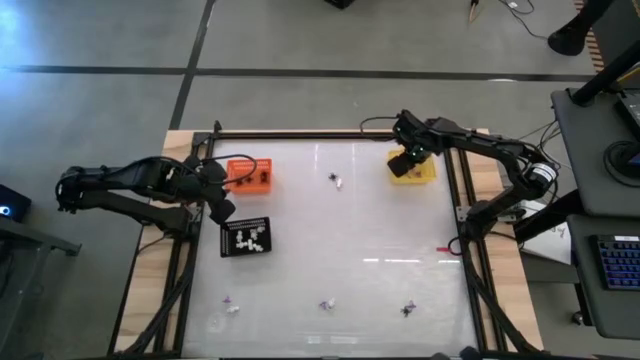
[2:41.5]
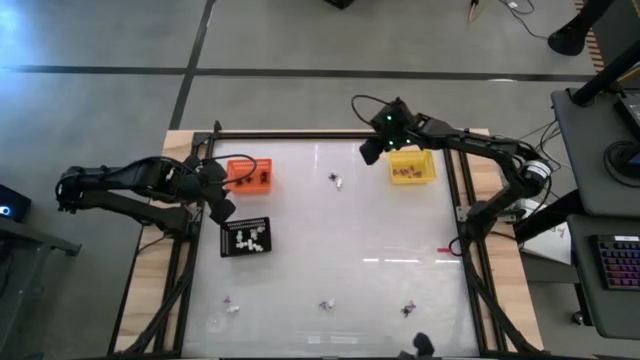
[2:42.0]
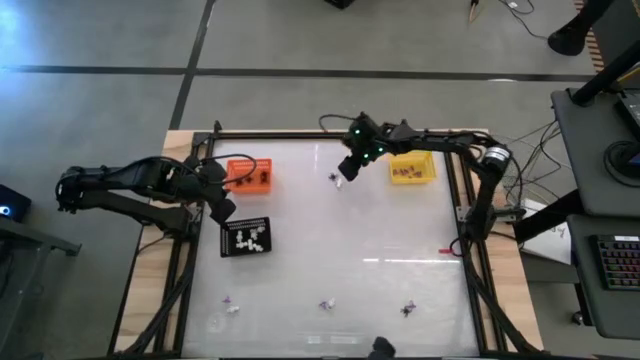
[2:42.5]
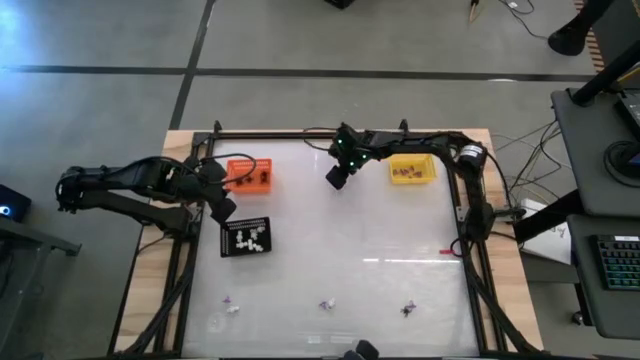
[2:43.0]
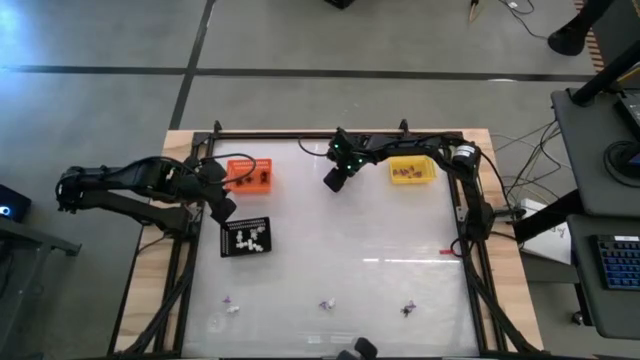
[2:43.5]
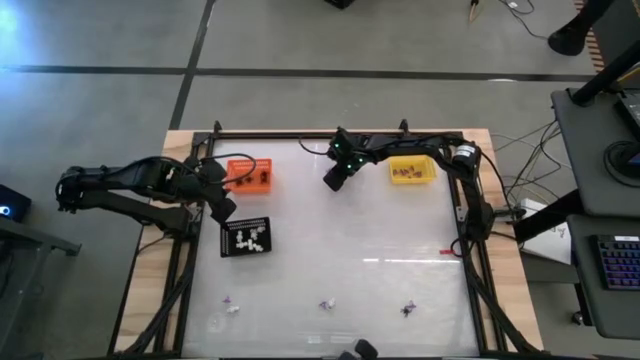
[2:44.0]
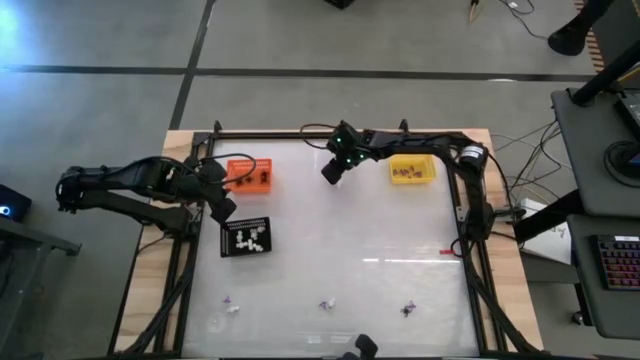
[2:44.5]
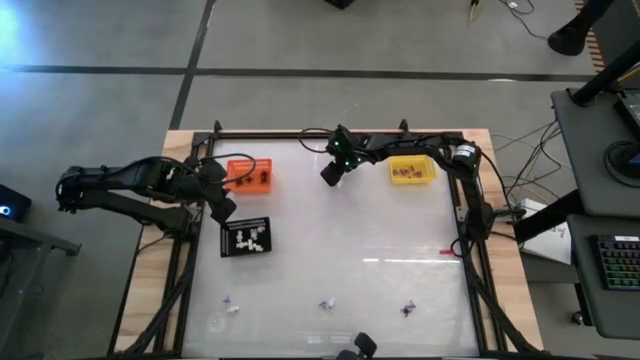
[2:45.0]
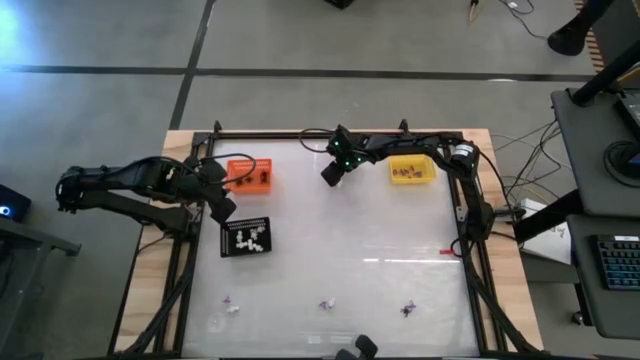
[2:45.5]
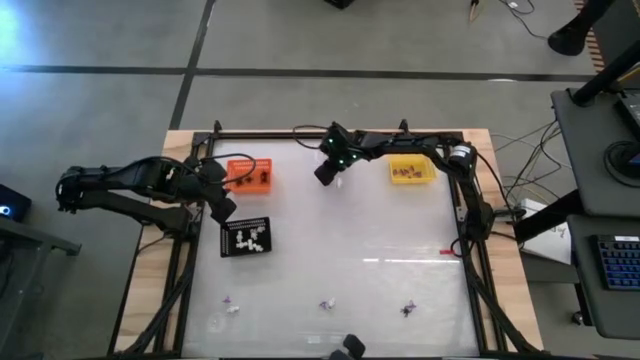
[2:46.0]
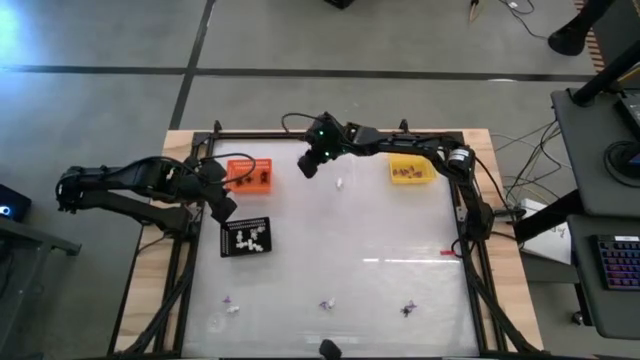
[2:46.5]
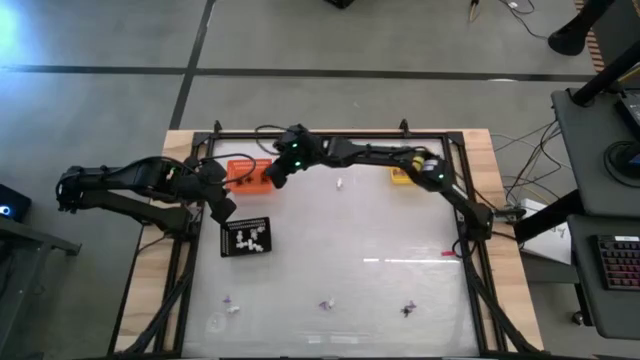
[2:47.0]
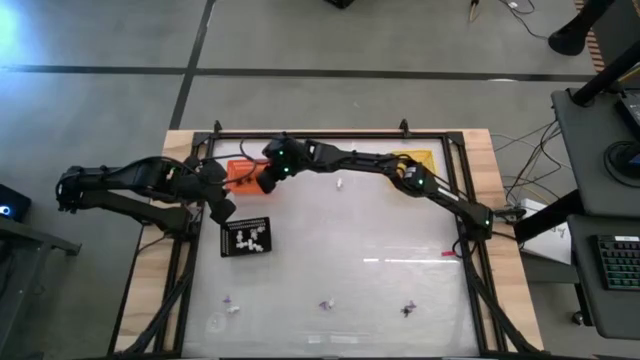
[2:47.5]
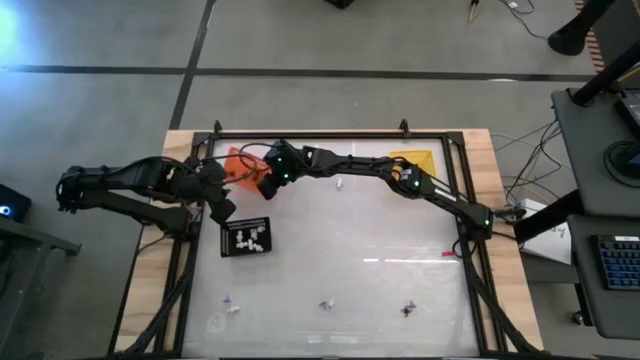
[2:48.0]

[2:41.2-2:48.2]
Task: Sort Halloween decoration
Put the black spider toy into the orange bin

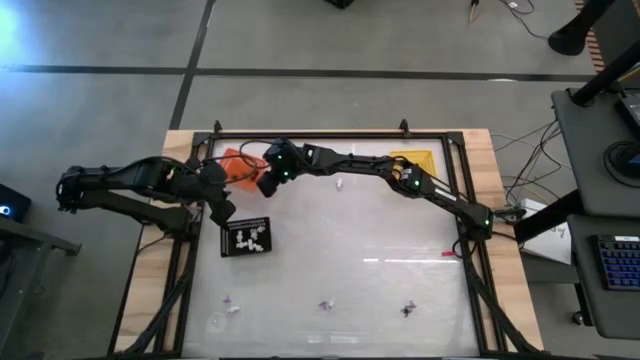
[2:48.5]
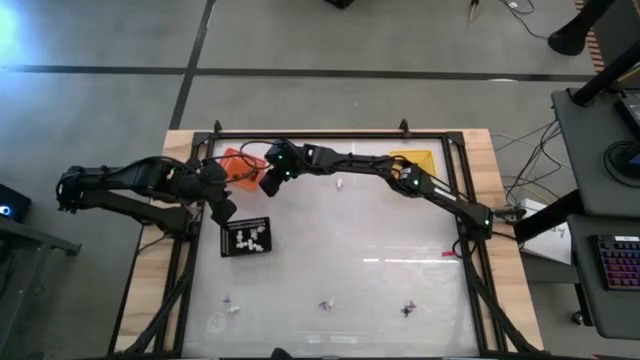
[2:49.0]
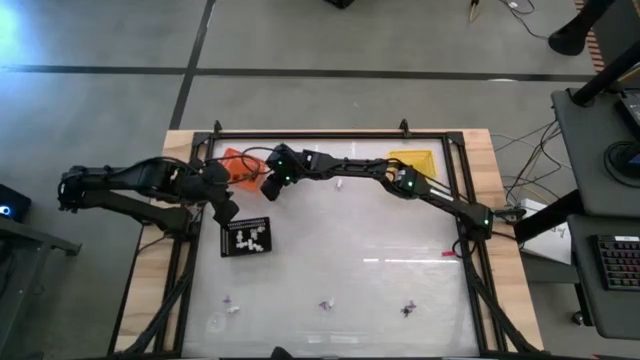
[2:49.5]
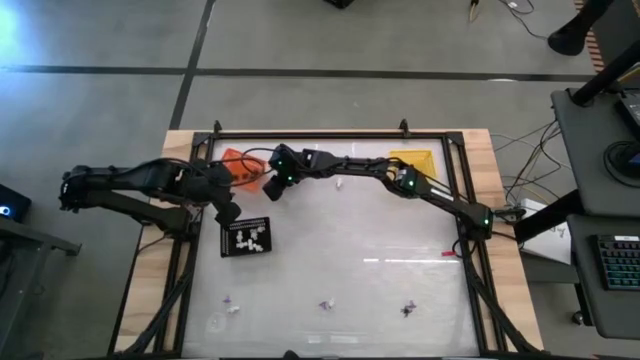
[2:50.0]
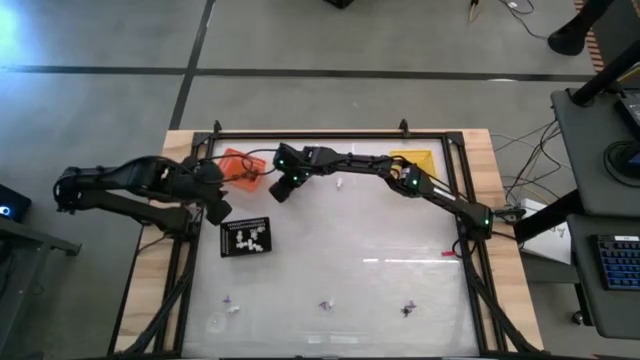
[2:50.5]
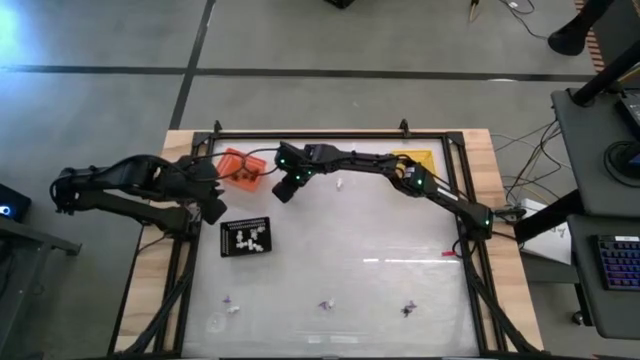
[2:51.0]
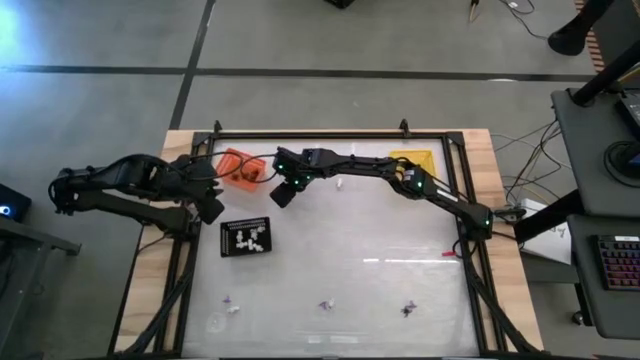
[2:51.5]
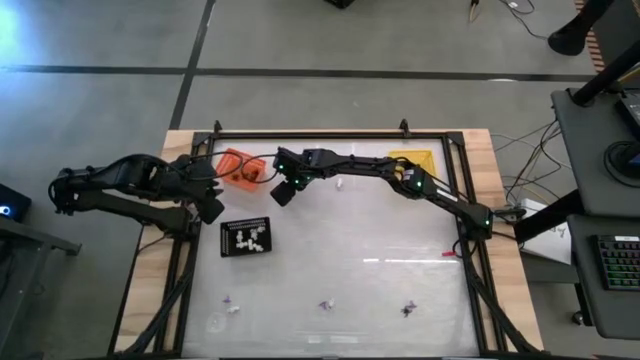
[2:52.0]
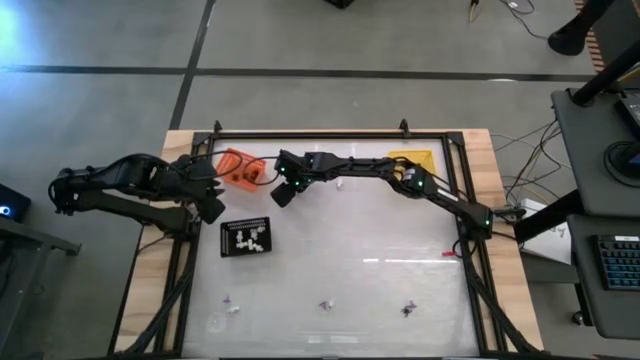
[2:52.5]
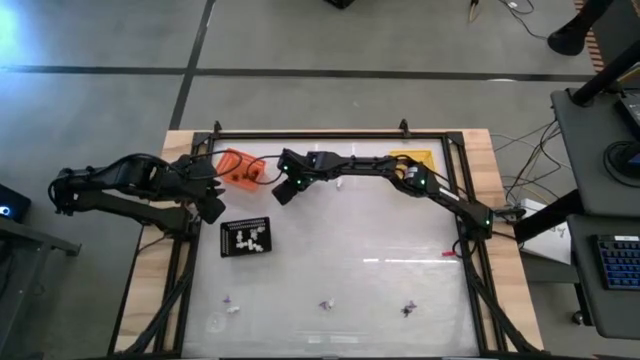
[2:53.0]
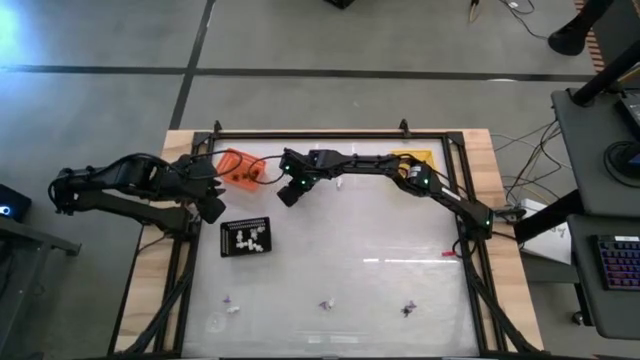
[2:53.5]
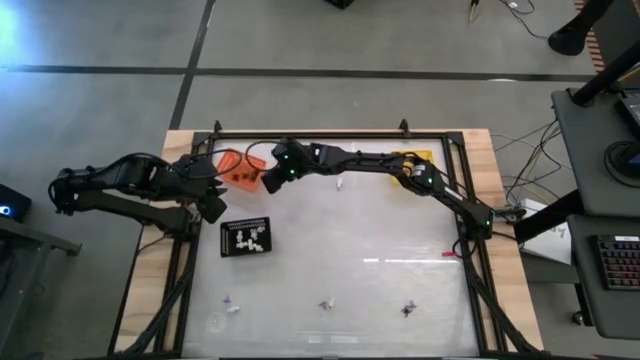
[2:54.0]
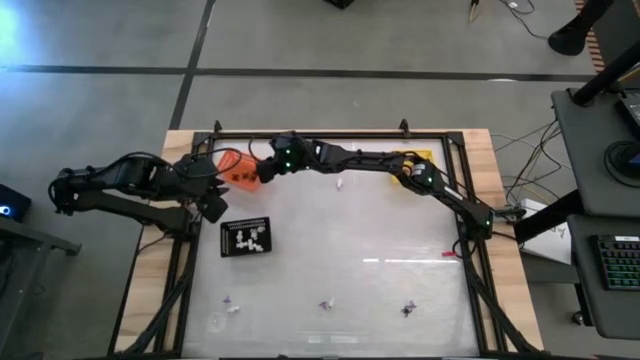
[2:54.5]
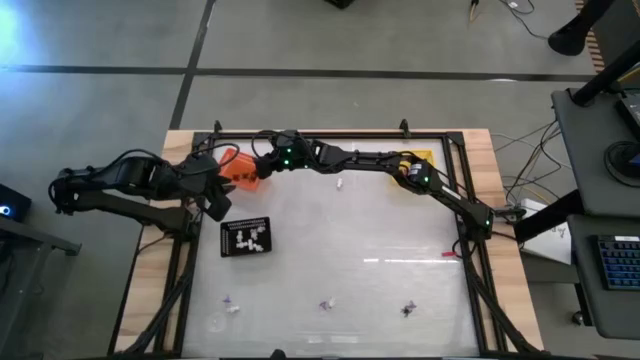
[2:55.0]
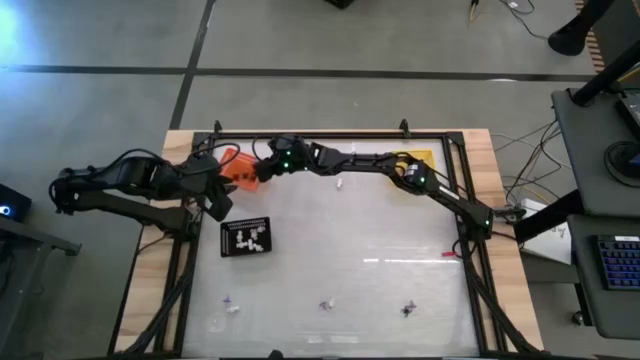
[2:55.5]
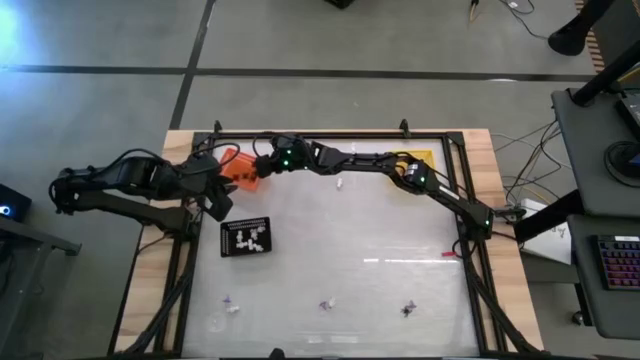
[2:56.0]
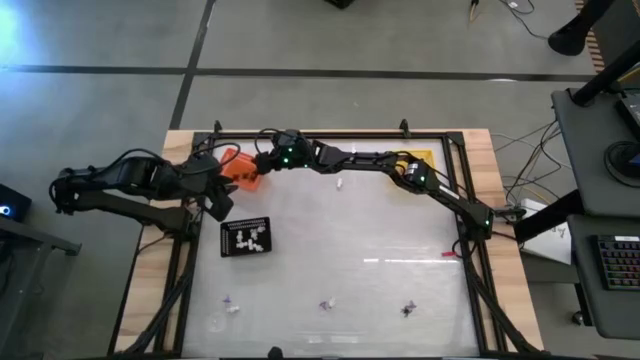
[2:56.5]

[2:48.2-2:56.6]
Put the black spider toy into the orange bin

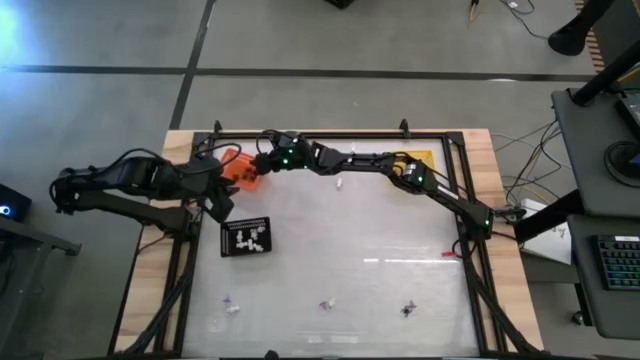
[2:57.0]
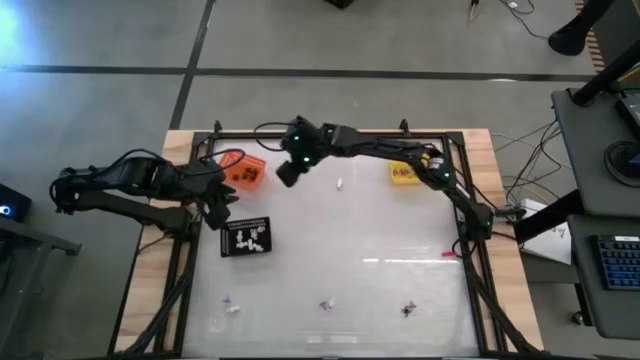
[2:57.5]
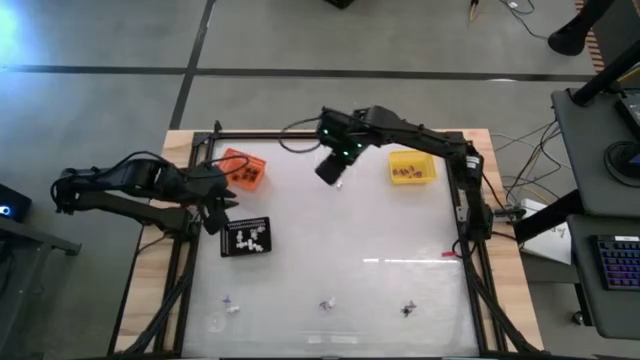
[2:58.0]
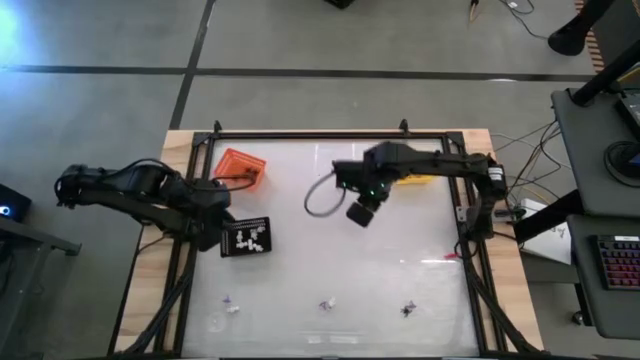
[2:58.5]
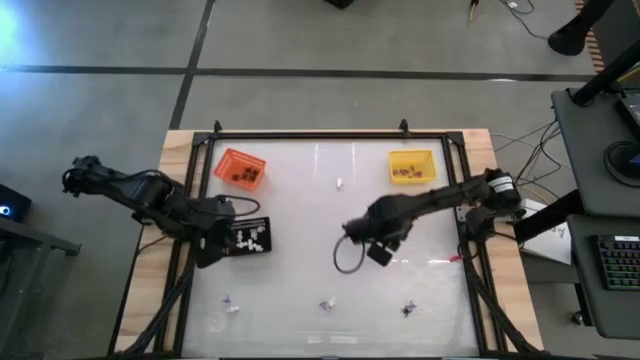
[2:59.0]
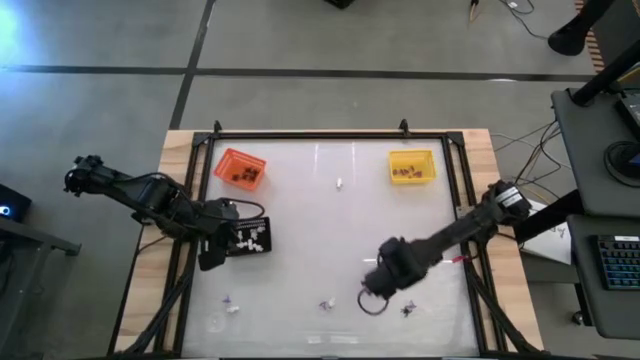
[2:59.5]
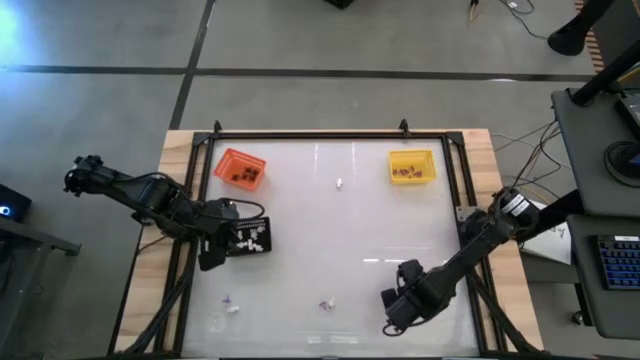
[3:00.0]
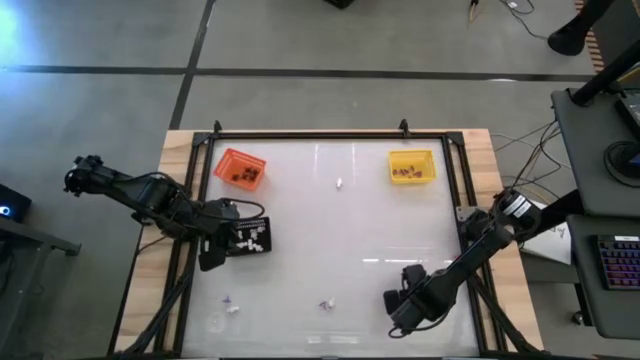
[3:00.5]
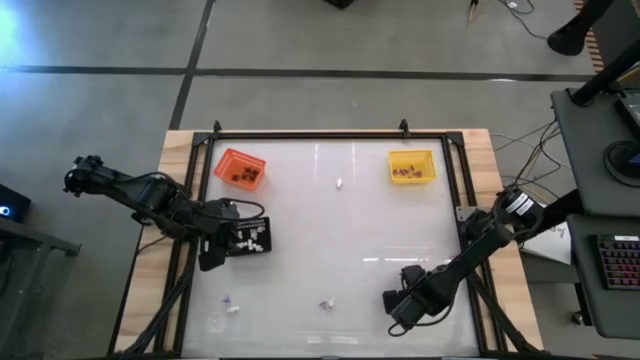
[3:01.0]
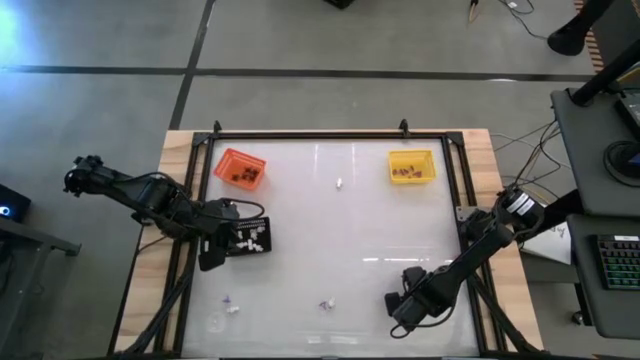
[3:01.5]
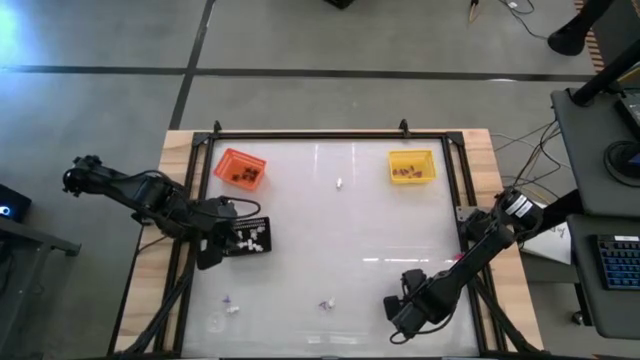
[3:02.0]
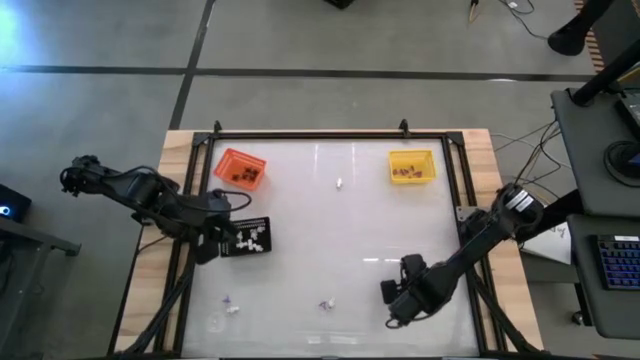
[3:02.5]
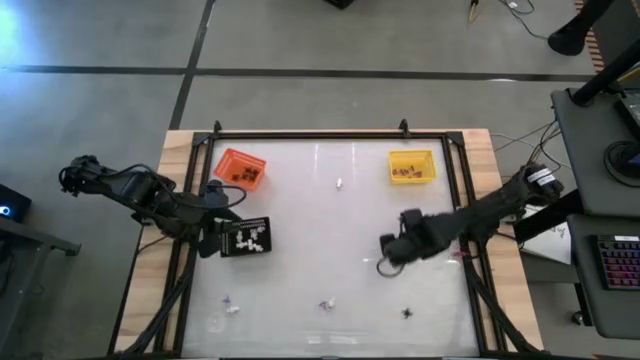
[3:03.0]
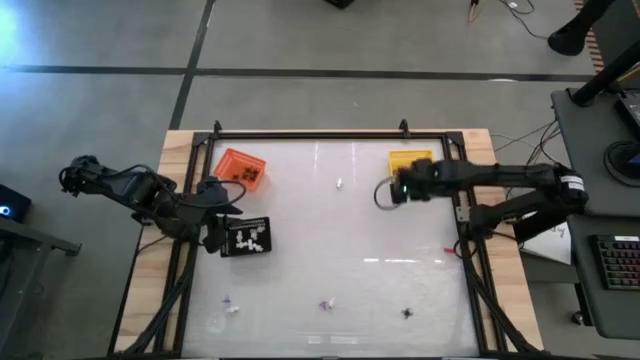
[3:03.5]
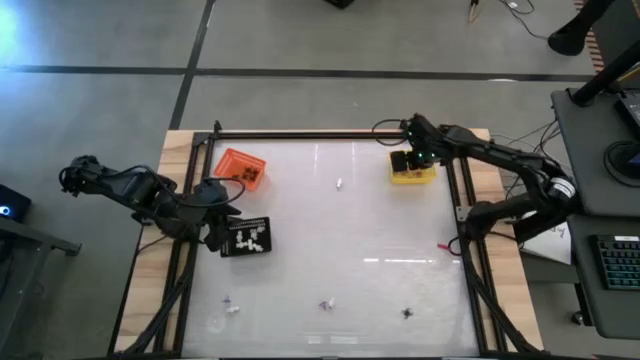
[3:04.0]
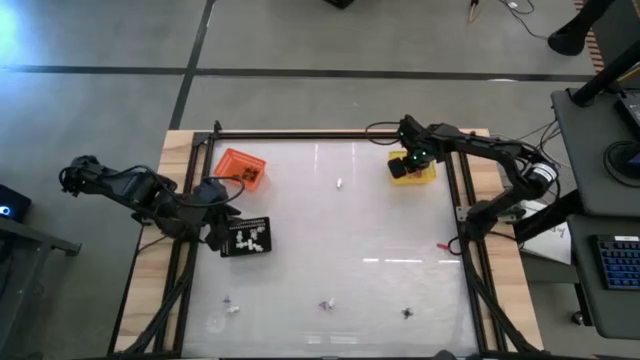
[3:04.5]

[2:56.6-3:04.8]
Put the purple witch hat toy into the yellow bin
